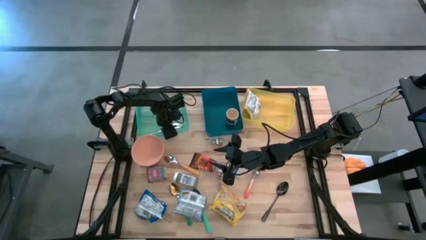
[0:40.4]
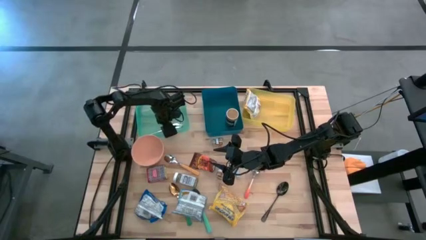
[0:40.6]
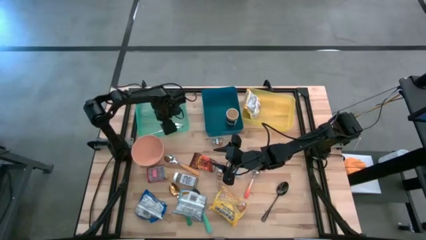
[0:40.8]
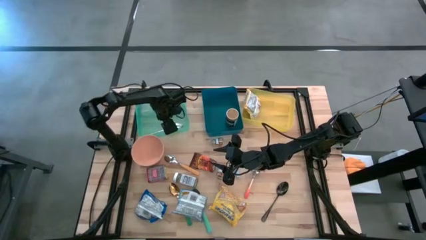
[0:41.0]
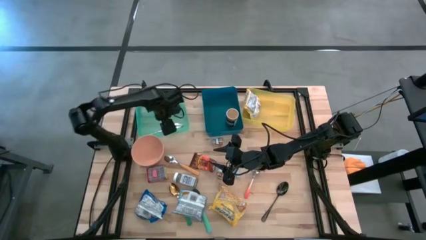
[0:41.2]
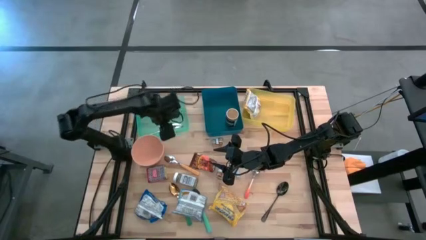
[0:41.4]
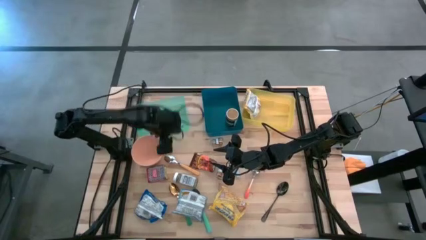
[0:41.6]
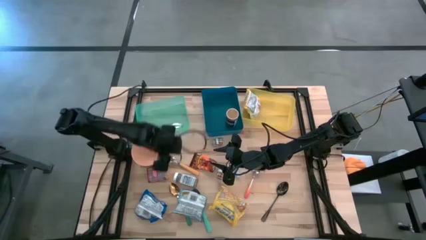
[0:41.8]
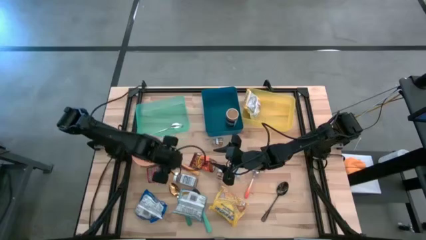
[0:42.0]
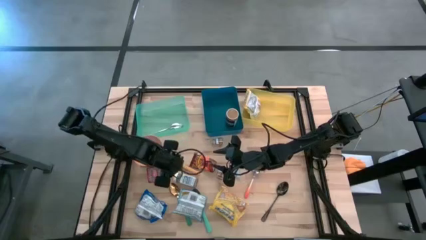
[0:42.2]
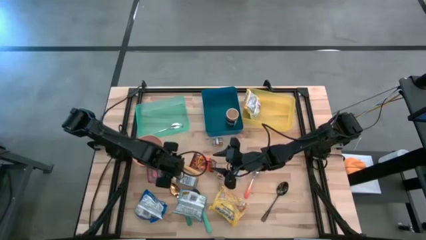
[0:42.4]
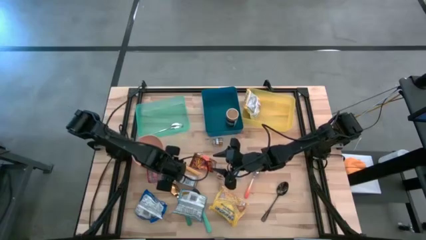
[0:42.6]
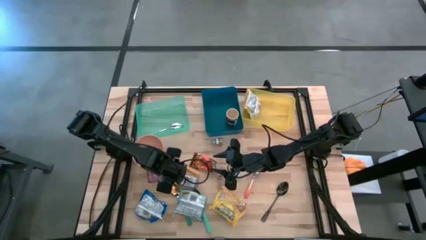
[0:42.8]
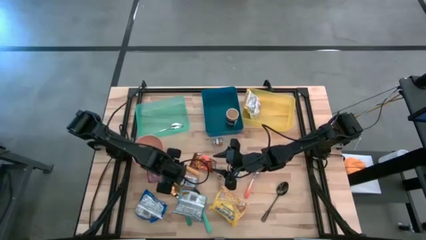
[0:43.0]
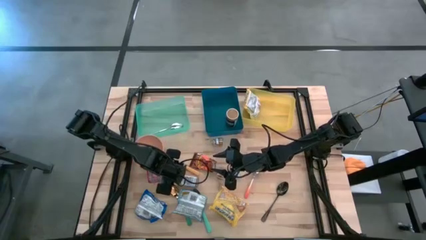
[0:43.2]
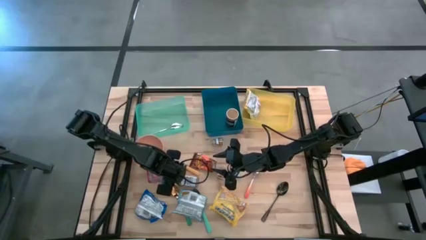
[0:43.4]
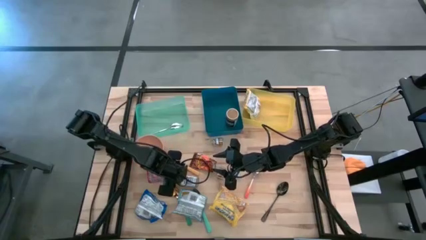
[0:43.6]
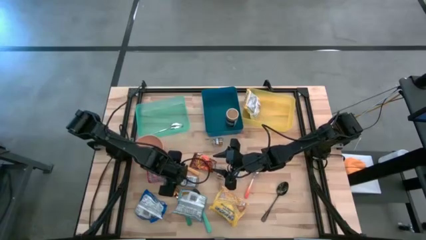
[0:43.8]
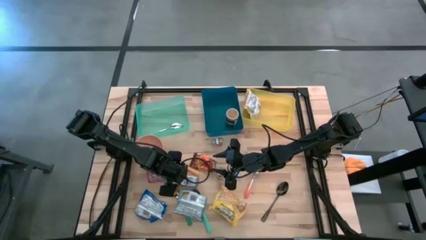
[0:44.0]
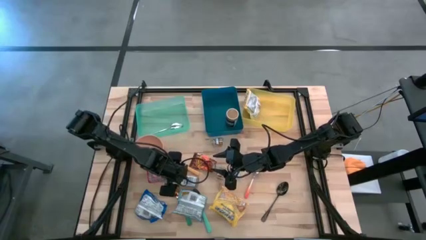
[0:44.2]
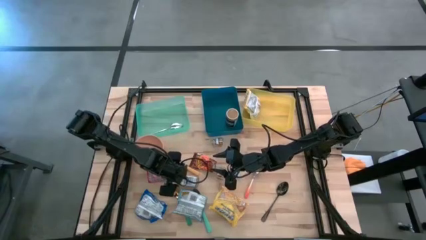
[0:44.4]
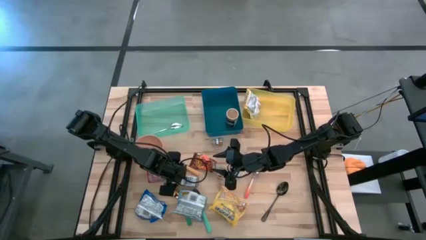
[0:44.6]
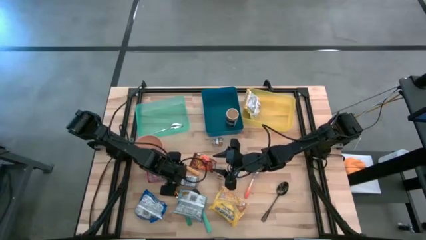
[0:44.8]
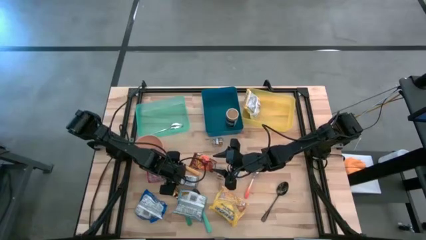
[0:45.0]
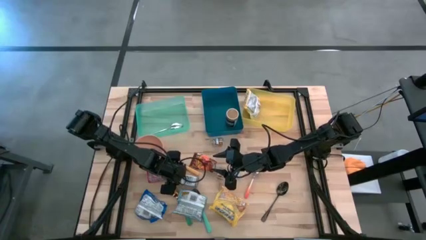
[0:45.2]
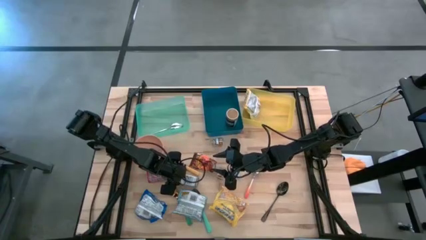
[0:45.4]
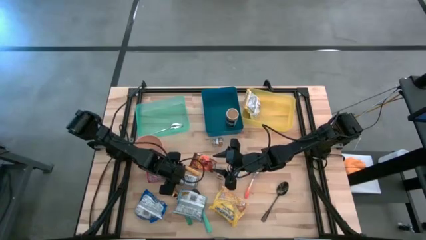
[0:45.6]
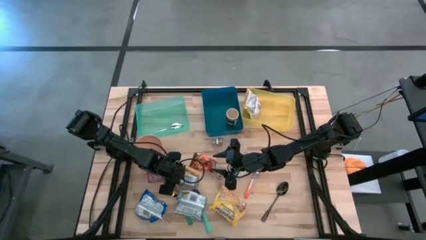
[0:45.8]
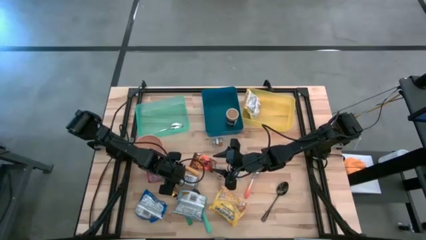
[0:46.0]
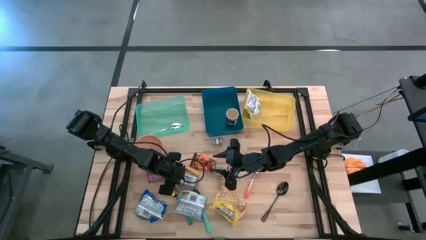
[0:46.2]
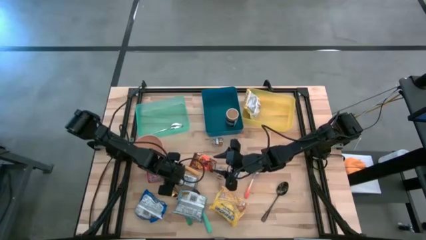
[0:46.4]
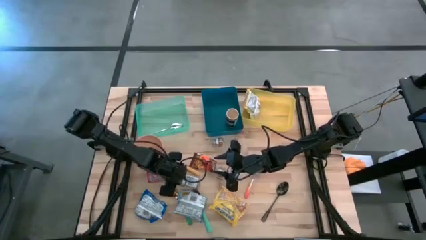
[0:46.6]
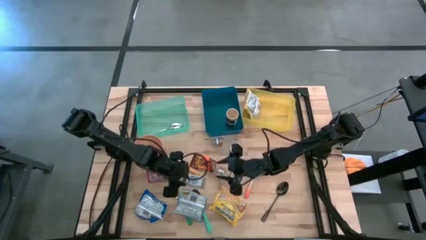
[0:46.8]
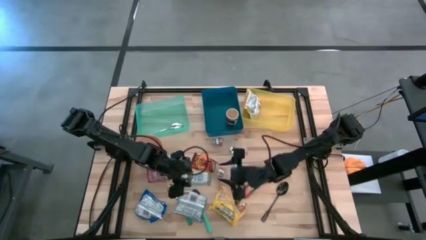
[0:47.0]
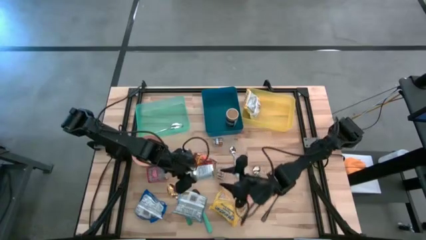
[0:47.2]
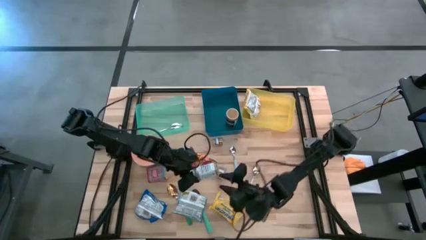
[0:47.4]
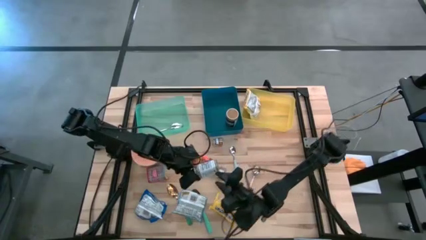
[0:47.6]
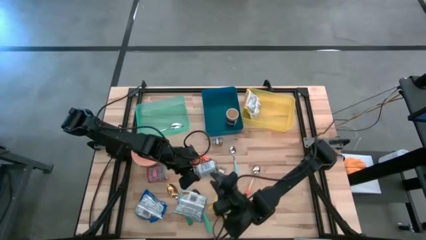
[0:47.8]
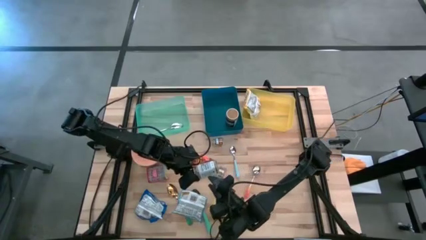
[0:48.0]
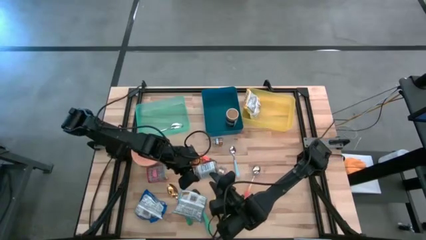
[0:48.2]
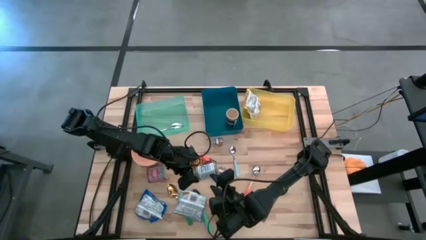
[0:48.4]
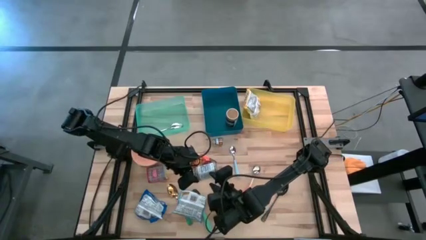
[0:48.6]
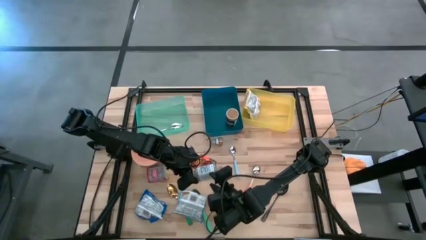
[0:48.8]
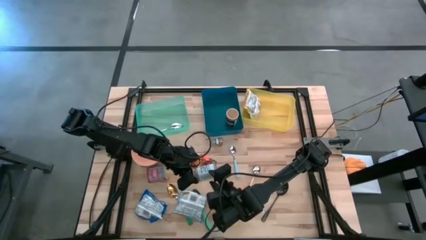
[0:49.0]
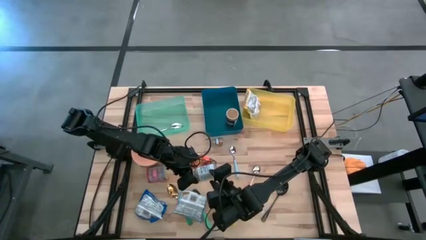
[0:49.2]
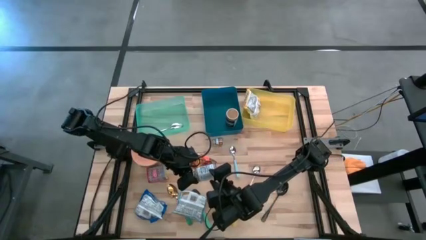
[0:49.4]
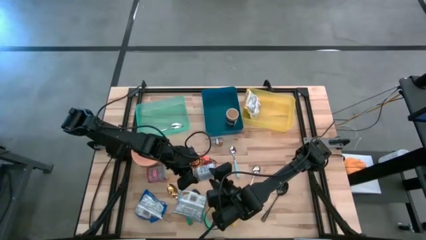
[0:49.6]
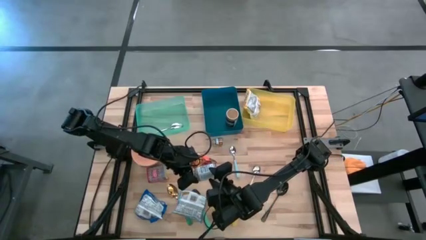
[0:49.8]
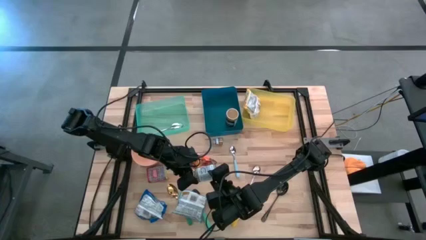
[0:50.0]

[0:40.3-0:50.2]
Put the white seasoning bottle into the blue bin

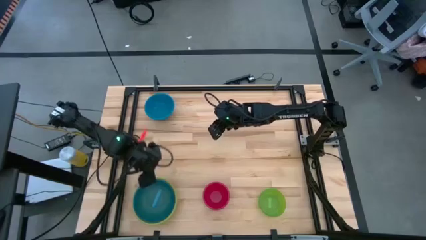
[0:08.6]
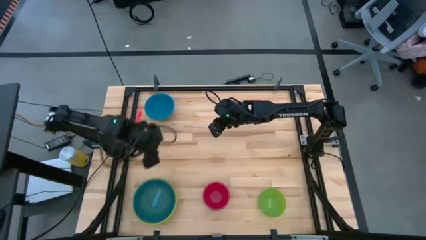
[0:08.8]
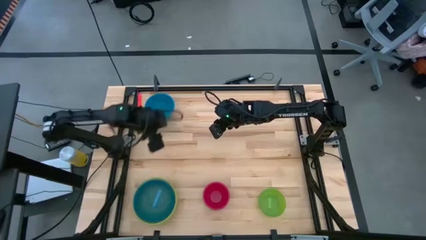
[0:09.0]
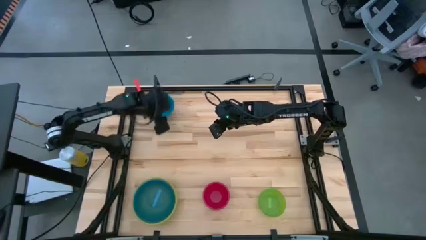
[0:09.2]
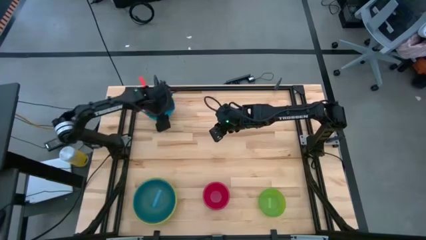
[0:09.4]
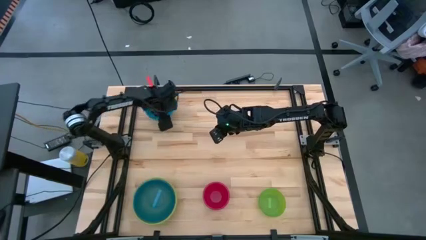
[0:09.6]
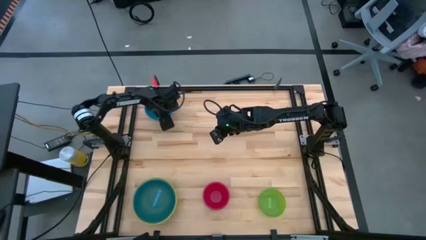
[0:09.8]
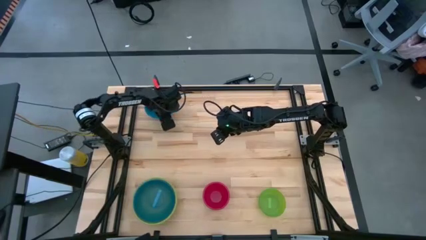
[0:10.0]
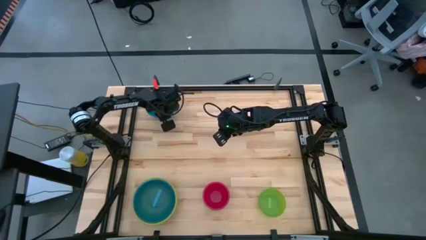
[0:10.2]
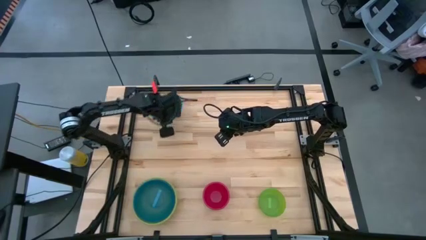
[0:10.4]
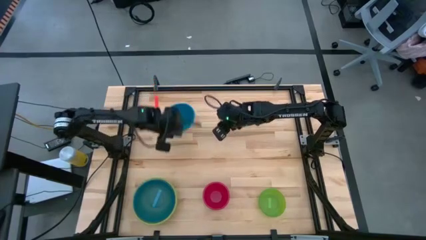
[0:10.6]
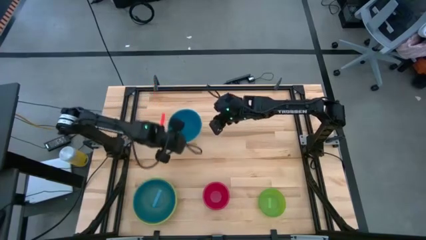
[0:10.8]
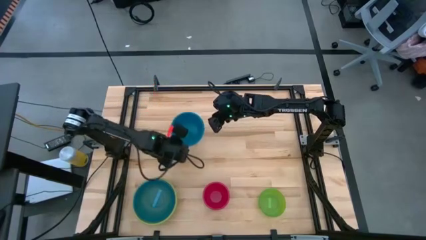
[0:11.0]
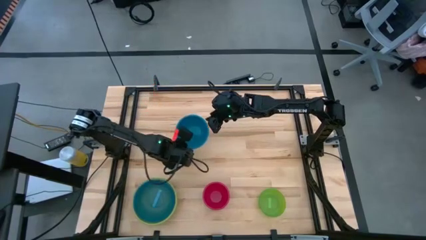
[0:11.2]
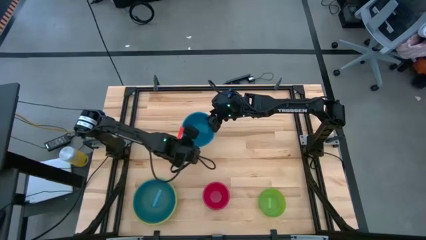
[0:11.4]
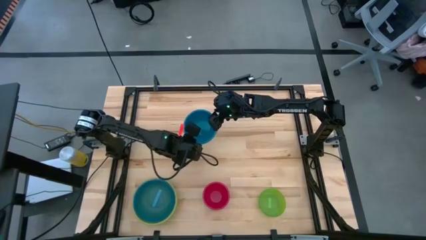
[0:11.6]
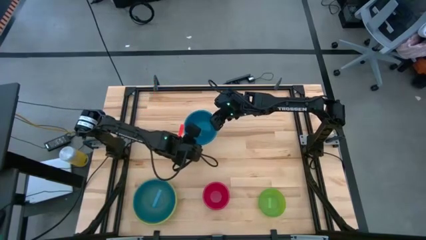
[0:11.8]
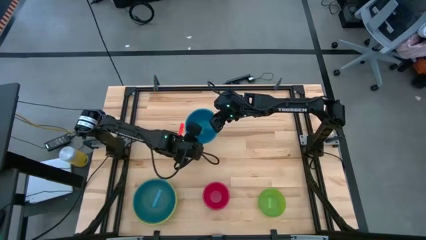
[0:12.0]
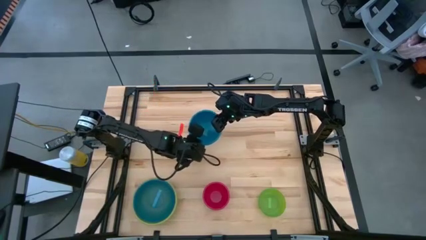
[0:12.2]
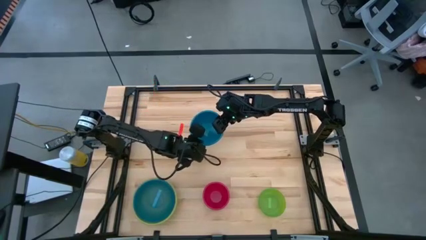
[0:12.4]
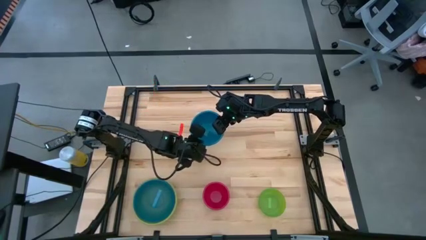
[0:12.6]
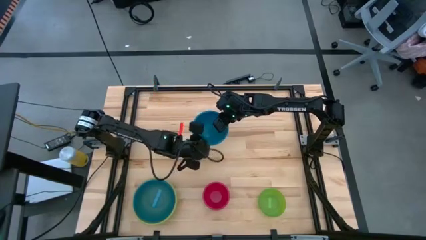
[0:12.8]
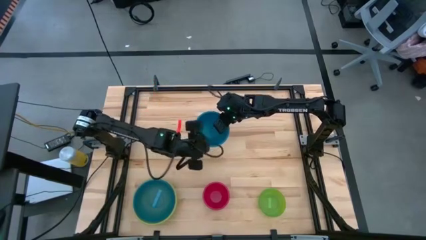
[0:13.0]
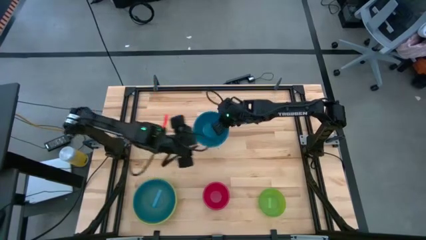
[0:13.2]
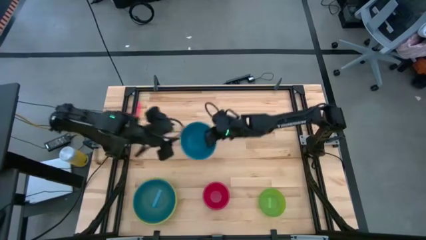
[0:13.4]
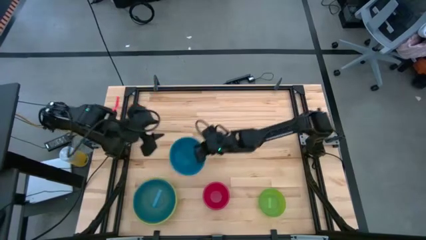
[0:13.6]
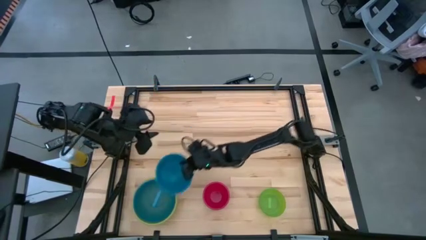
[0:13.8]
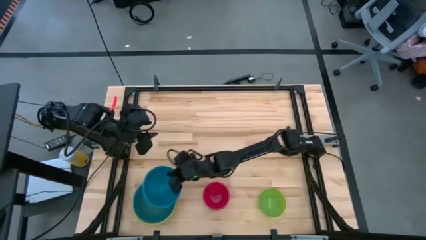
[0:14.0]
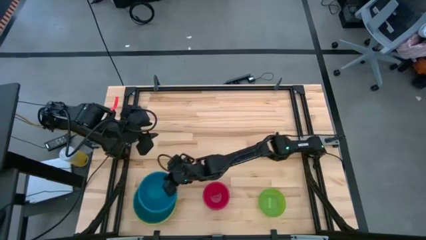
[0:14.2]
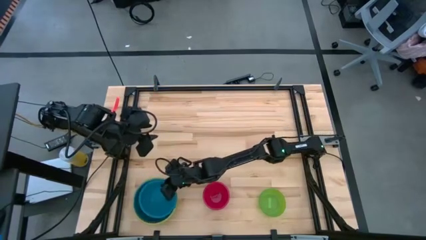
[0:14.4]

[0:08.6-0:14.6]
Stack the blue bowl on top of the transparent blue bowl
